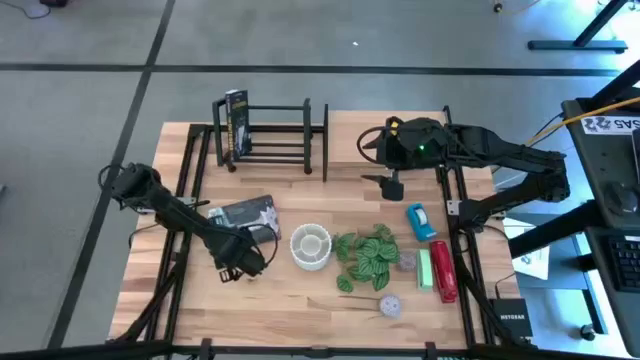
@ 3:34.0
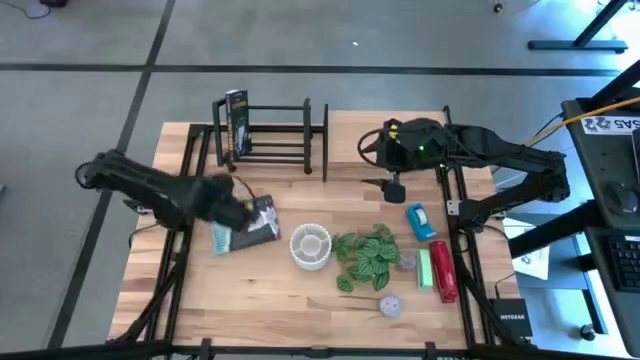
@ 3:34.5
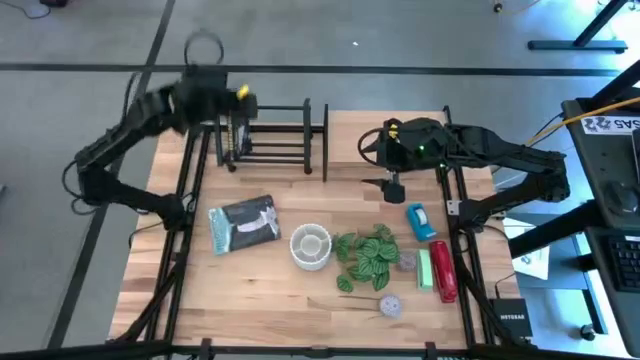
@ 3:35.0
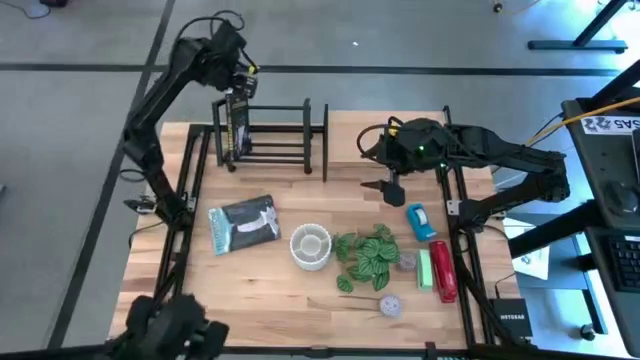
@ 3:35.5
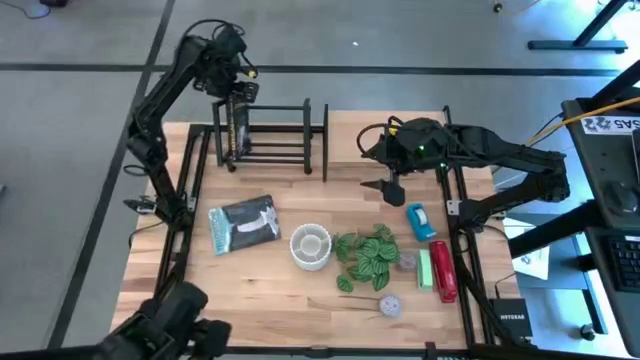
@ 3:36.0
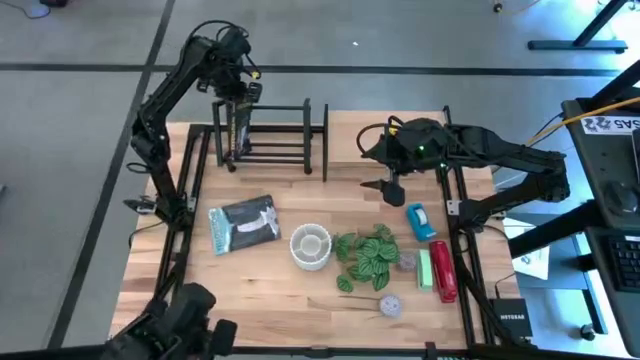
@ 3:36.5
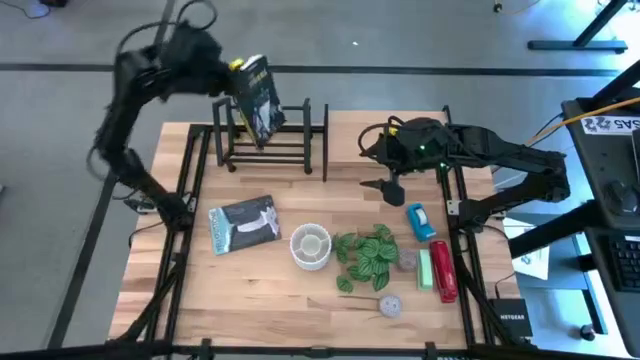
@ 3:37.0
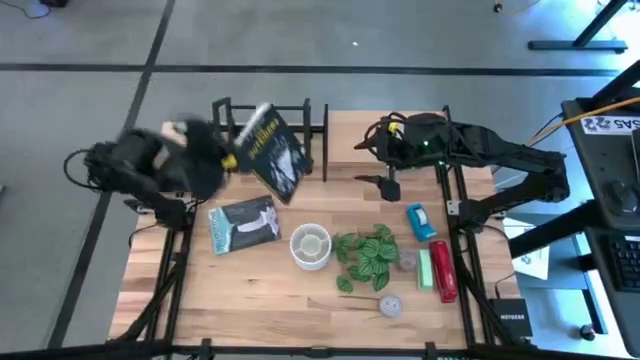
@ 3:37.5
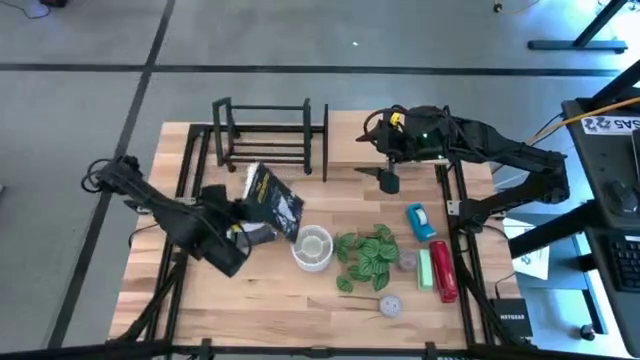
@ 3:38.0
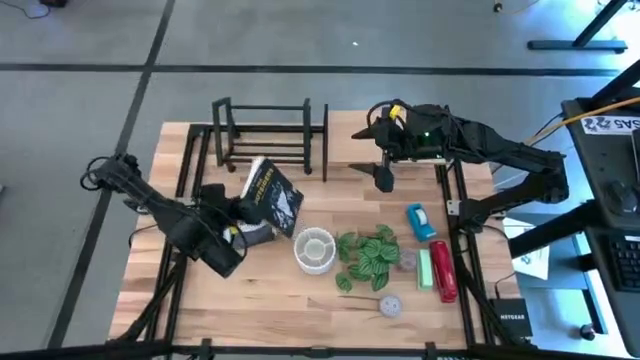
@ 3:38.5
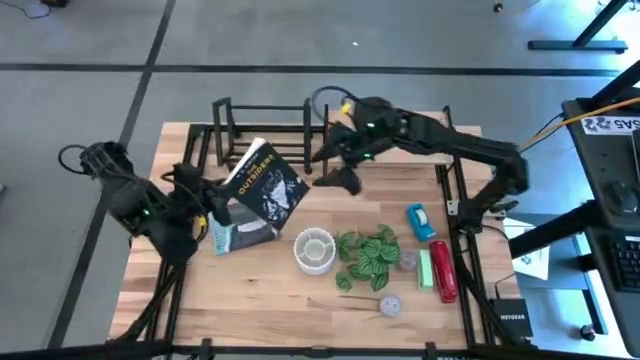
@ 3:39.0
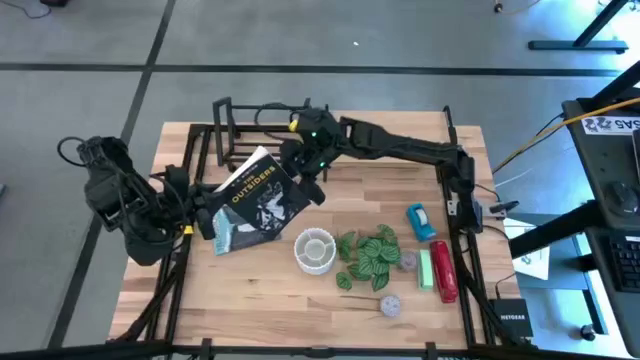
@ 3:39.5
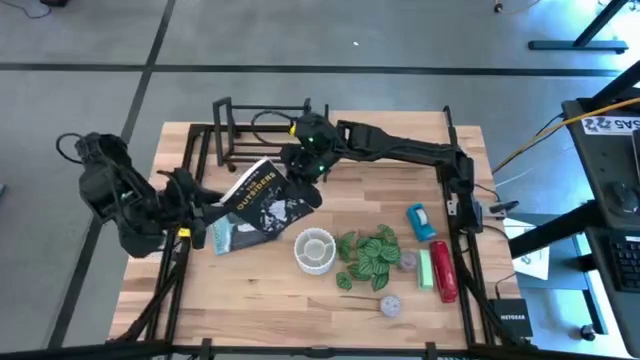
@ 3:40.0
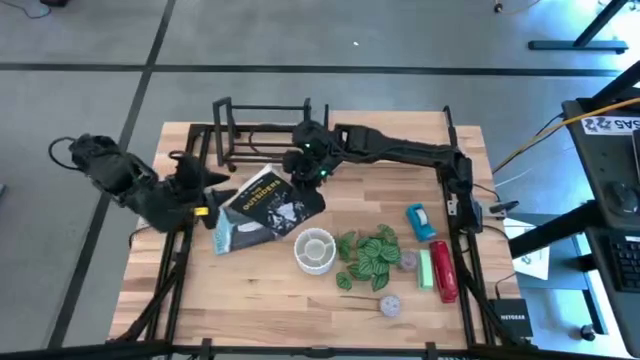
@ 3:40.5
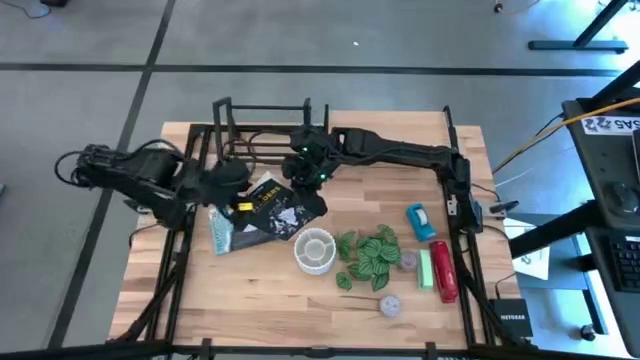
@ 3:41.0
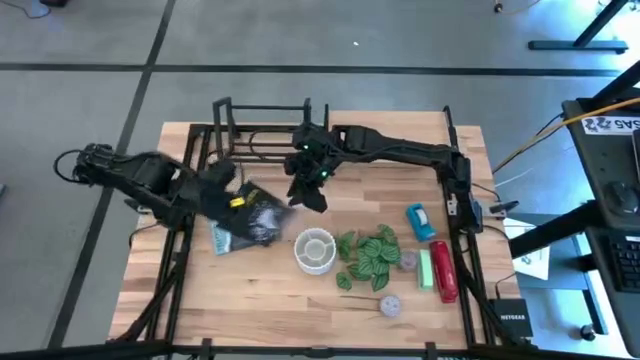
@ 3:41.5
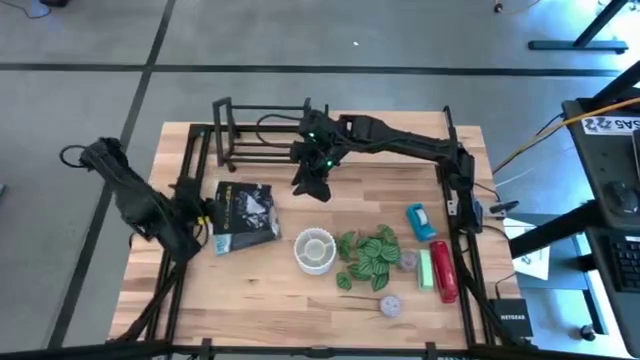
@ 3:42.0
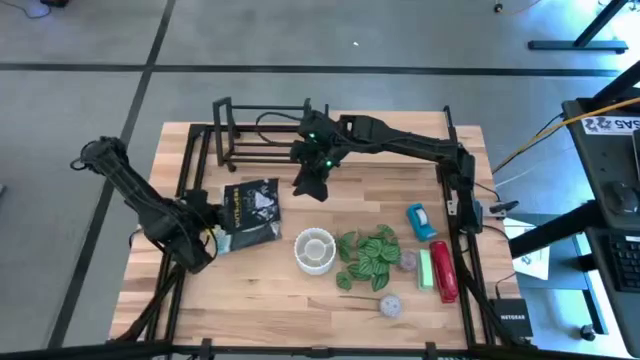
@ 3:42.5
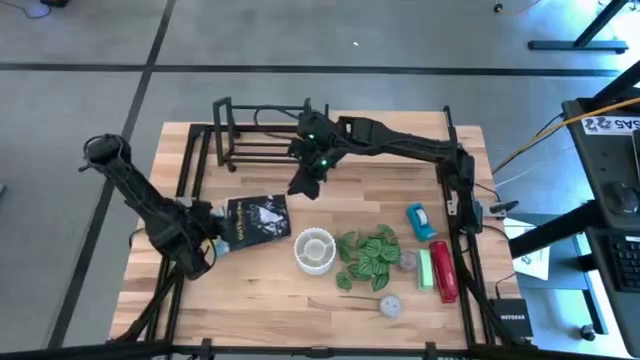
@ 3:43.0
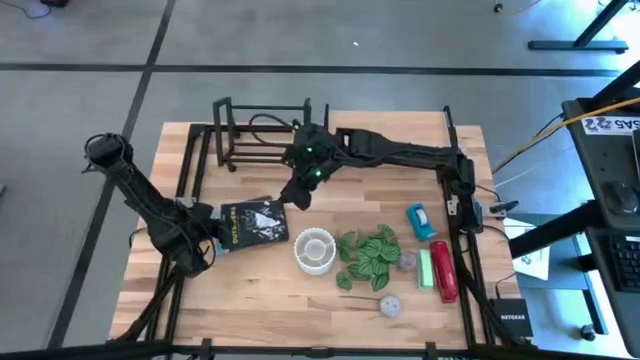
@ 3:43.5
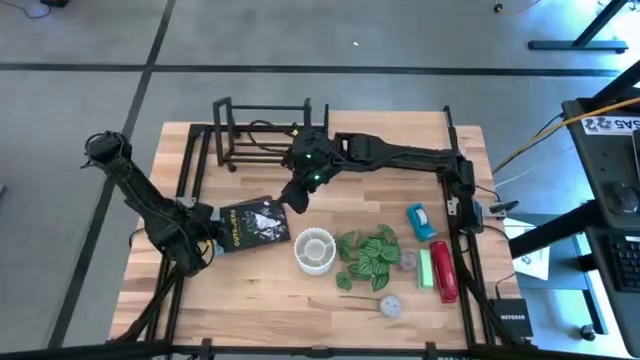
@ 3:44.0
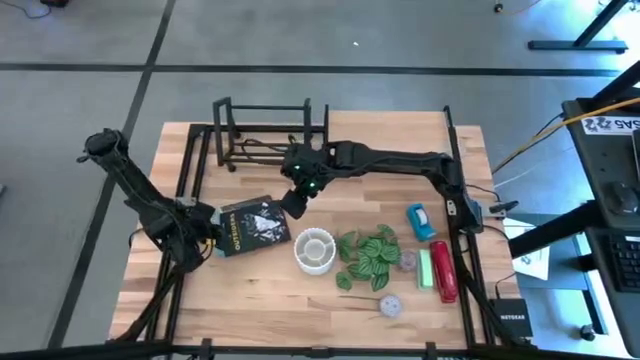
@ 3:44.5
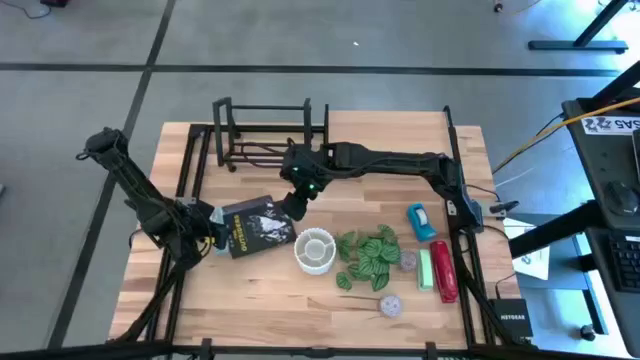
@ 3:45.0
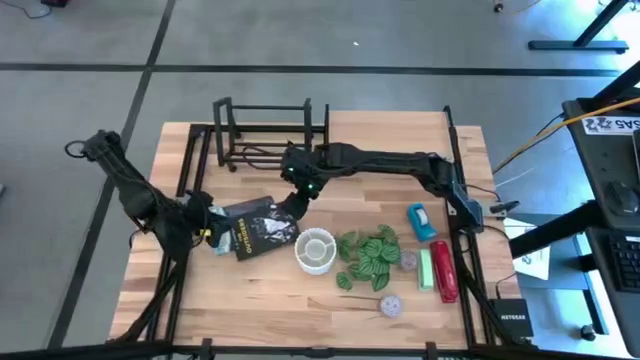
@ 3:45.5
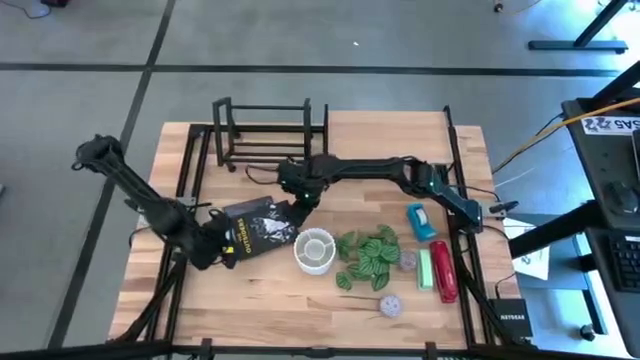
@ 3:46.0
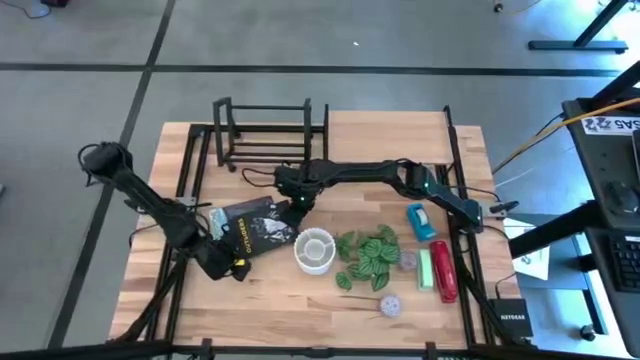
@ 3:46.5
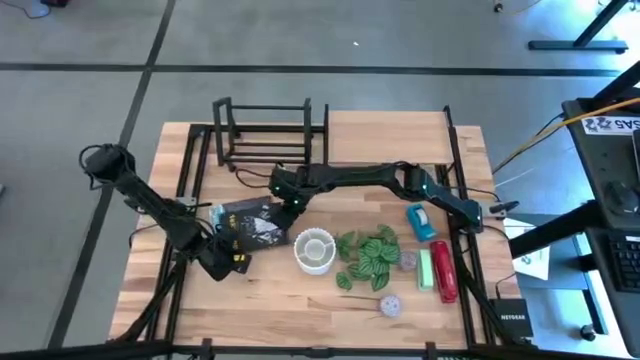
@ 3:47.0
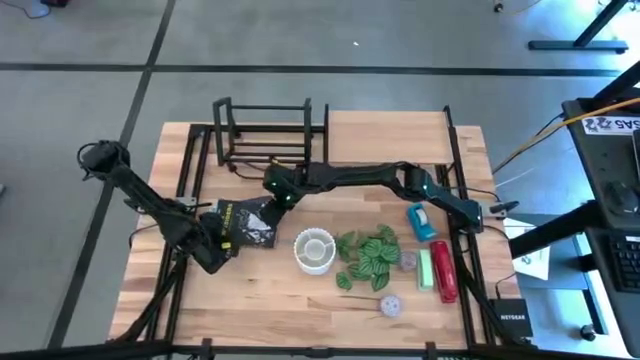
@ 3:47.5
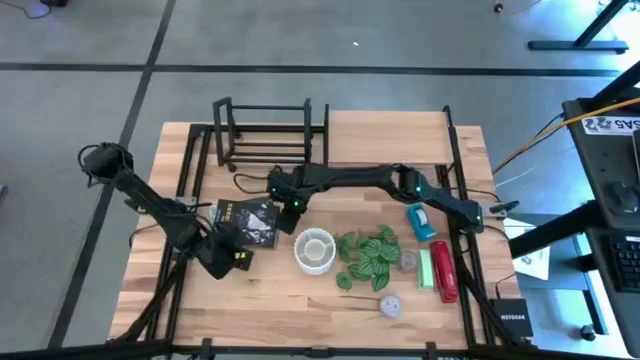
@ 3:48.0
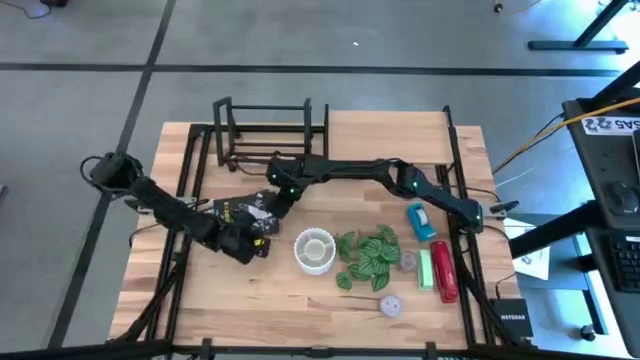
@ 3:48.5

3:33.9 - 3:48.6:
Task: Stock shelves
Remove the black book from the bookshelf

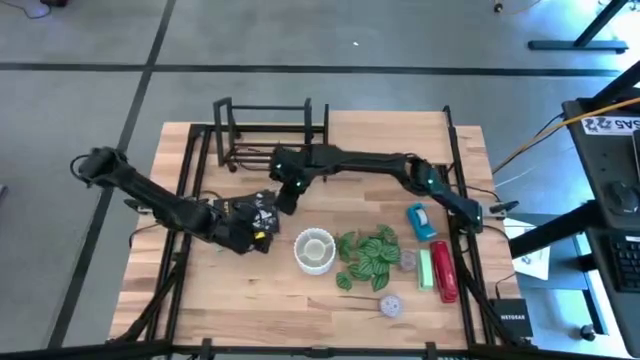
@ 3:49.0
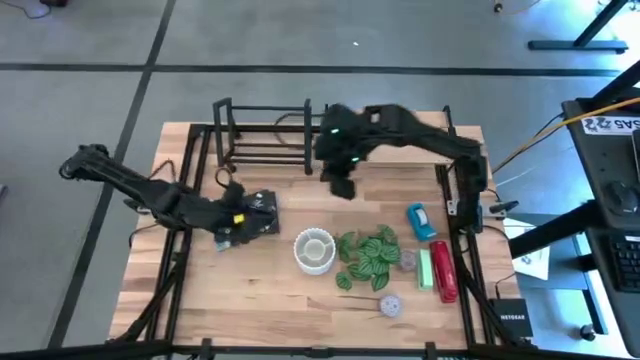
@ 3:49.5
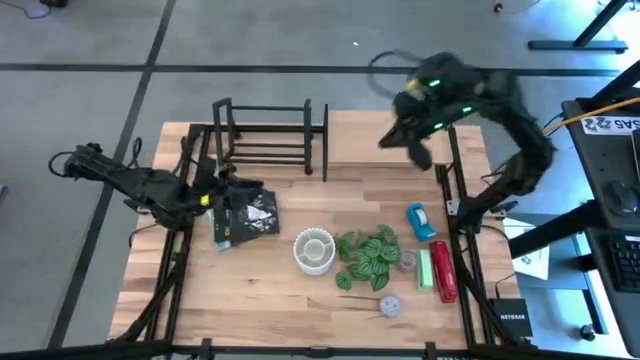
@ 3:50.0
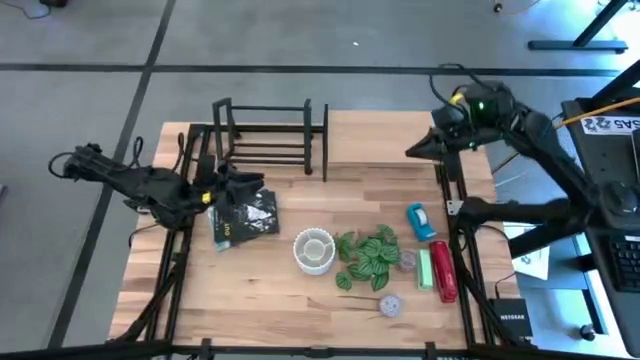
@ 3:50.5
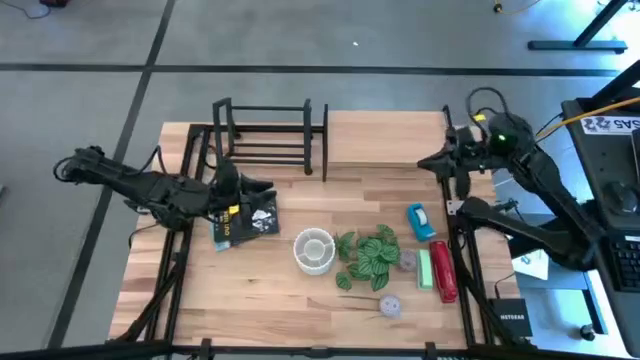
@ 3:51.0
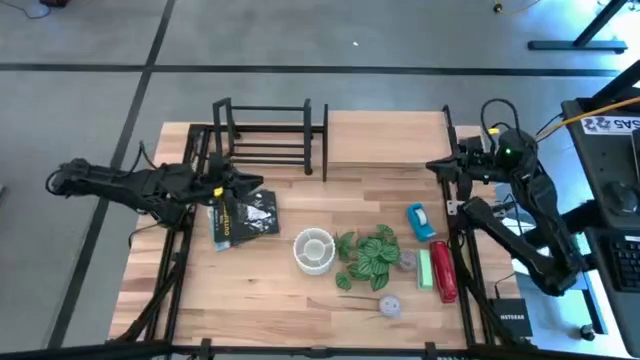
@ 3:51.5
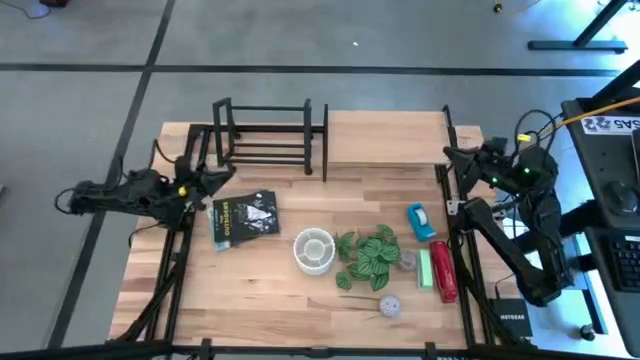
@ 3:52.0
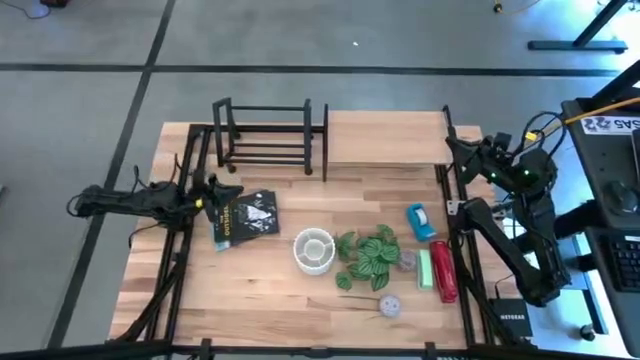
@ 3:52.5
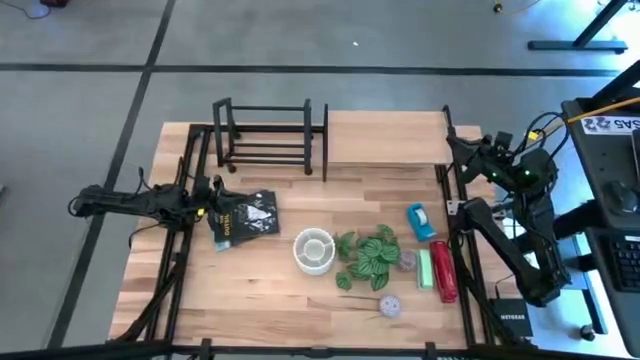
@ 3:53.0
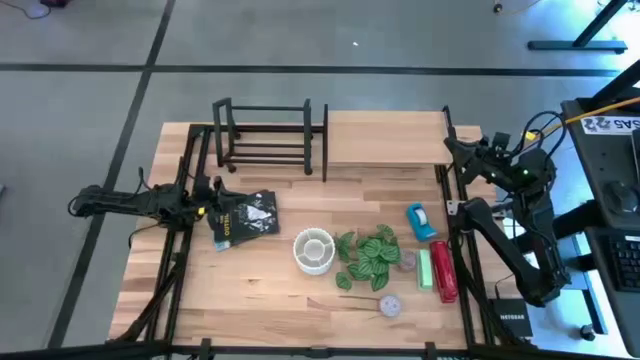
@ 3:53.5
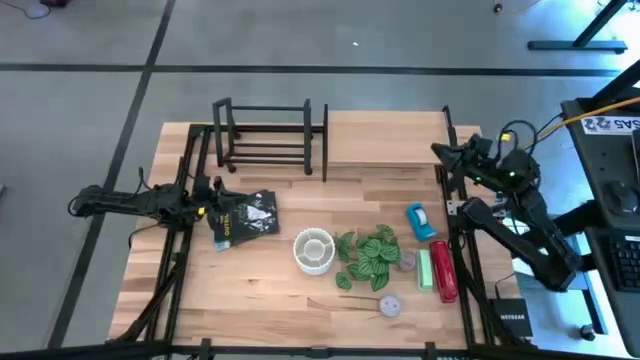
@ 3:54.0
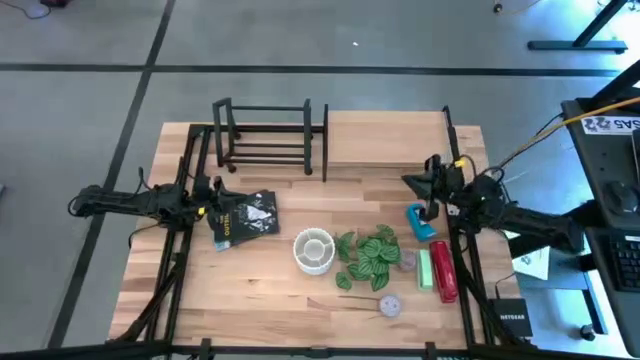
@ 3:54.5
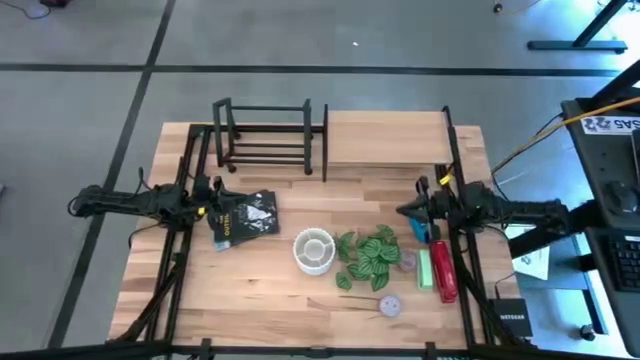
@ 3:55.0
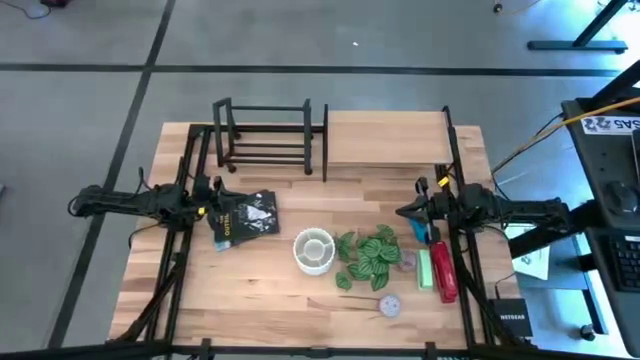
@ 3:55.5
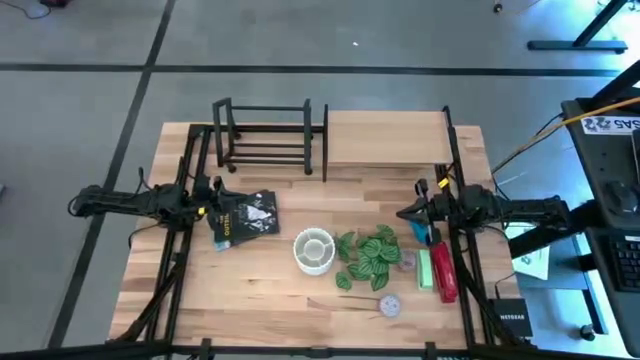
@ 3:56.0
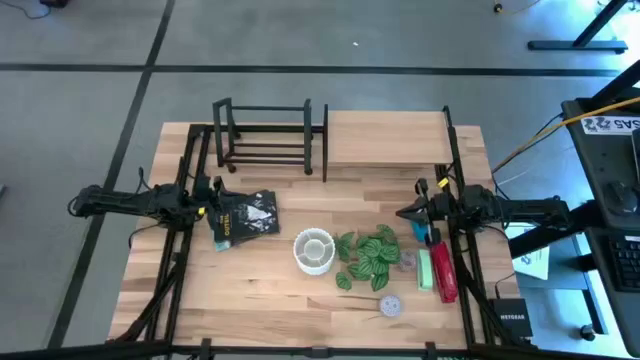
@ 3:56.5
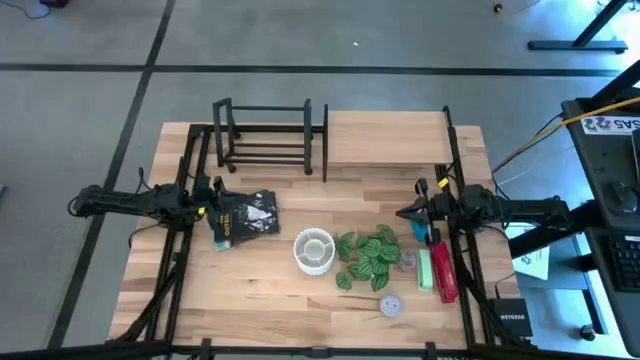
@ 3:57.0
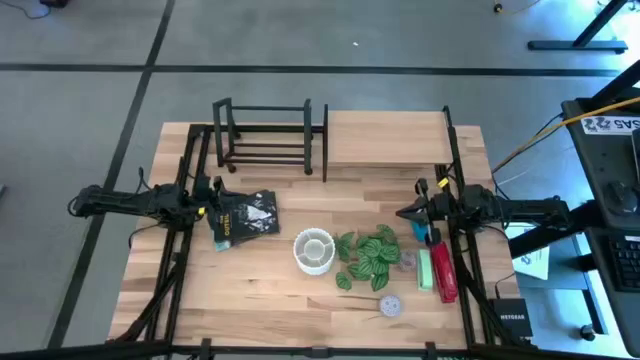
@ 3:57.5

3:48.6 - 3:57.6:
Return to Home Position
